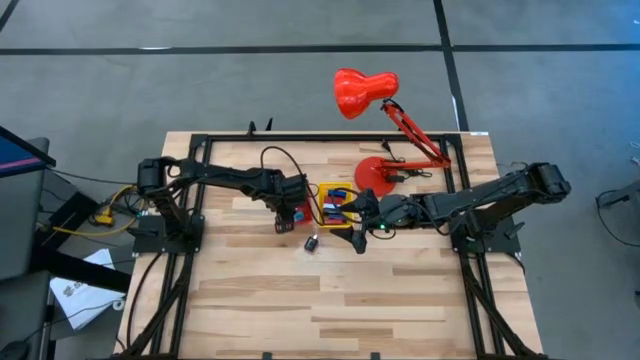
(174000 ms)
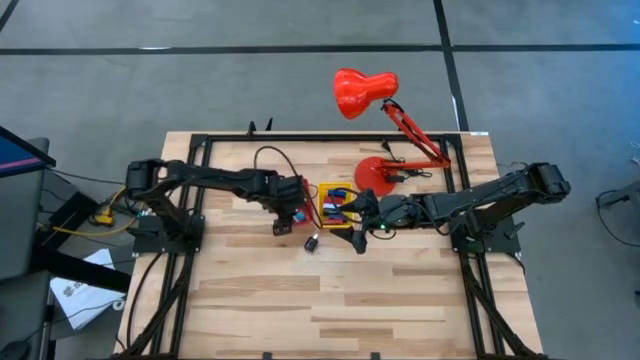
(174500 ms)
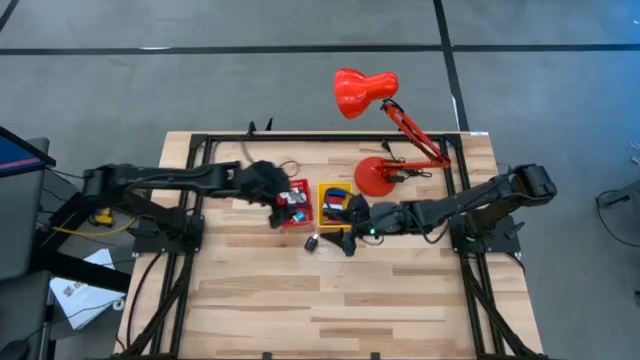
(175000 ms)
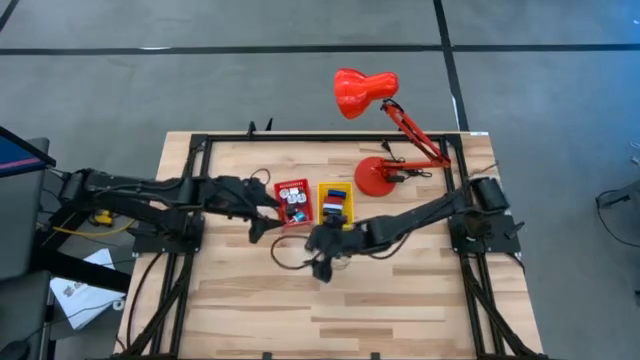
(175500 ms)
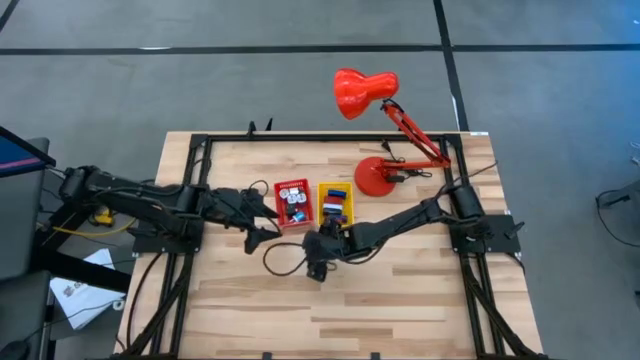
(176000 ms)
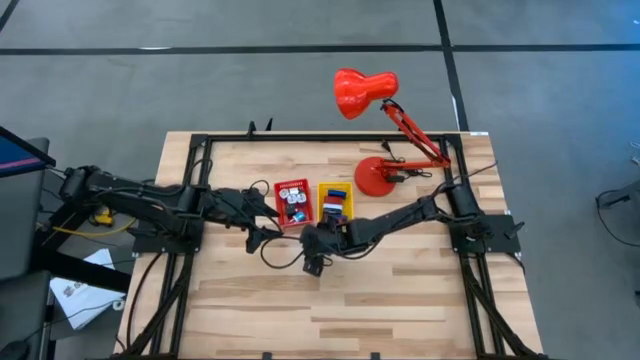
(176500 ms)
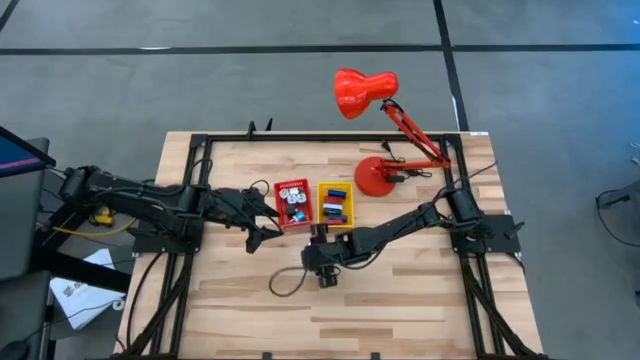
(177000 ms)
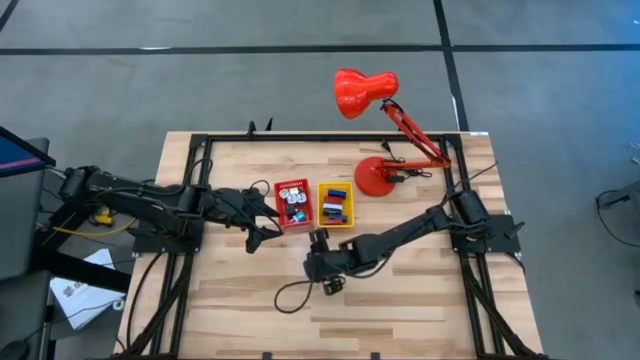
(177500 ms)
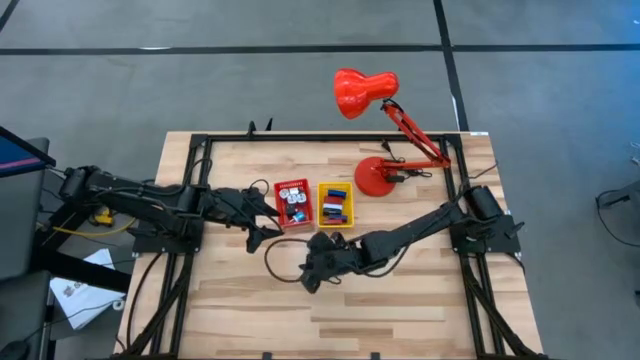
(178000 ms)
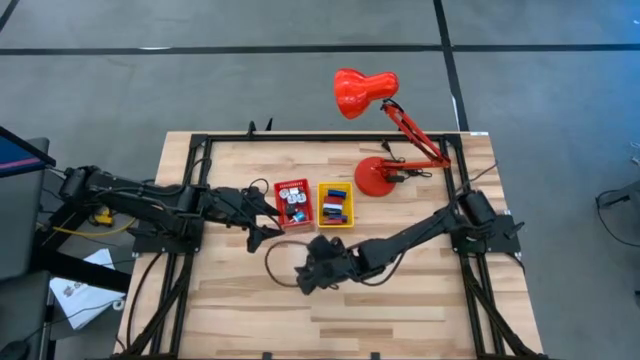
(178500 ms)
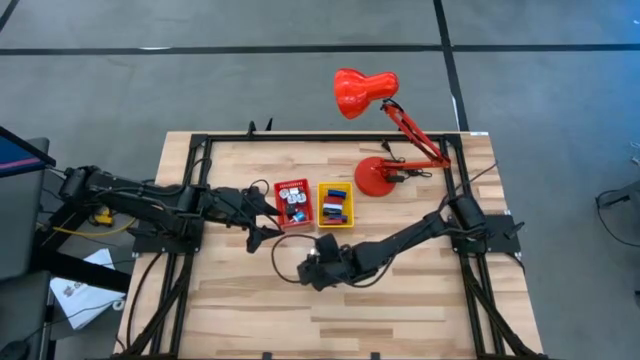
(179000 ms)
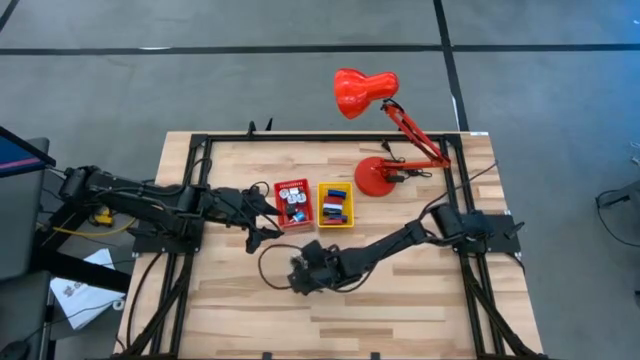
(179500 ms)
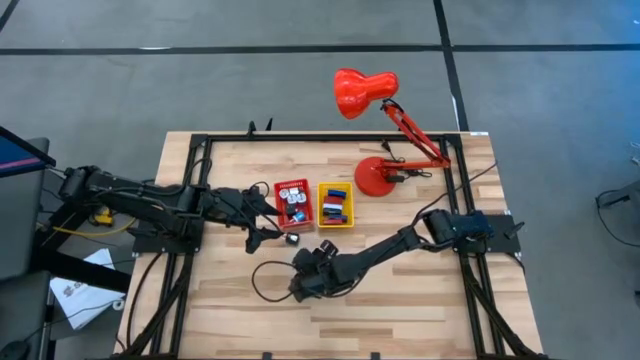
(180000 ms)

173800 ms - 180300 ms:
Task: Pick & Place Office items
Put the black charger adapter into the red basket

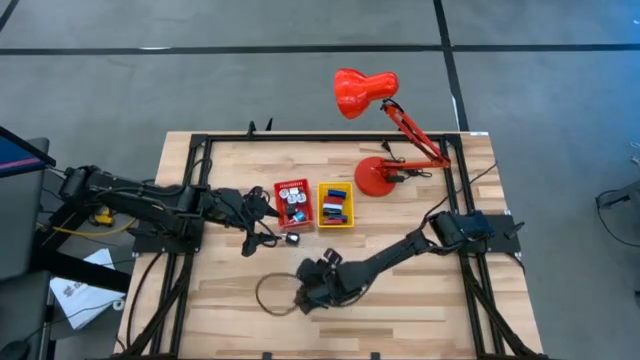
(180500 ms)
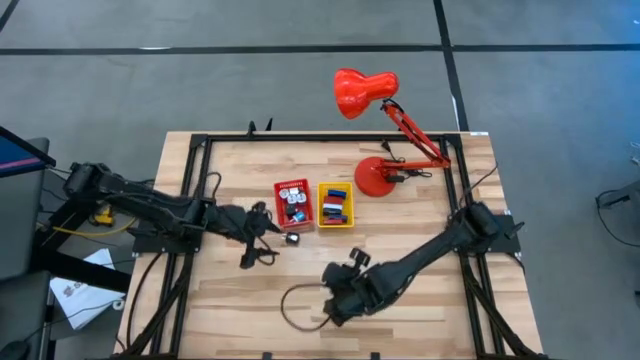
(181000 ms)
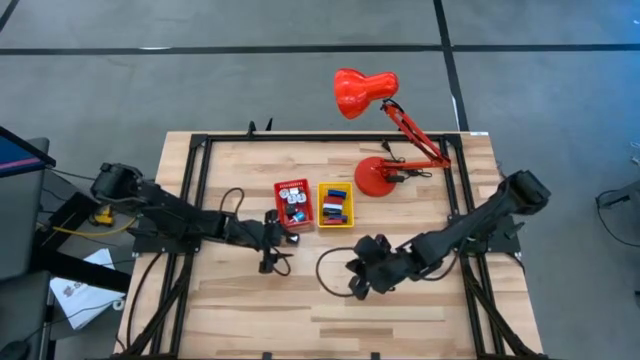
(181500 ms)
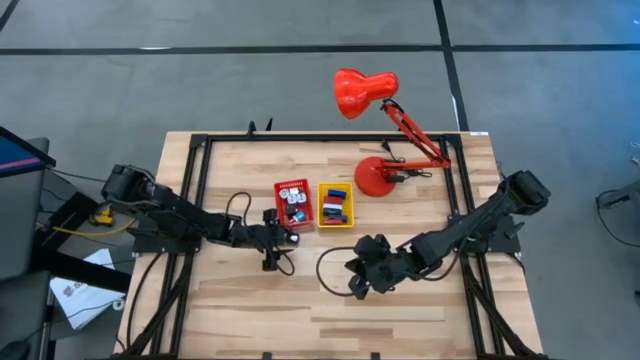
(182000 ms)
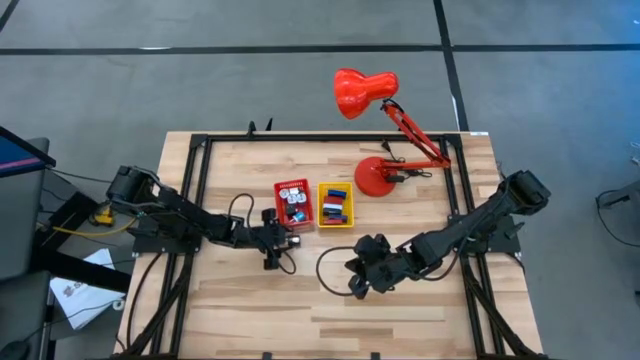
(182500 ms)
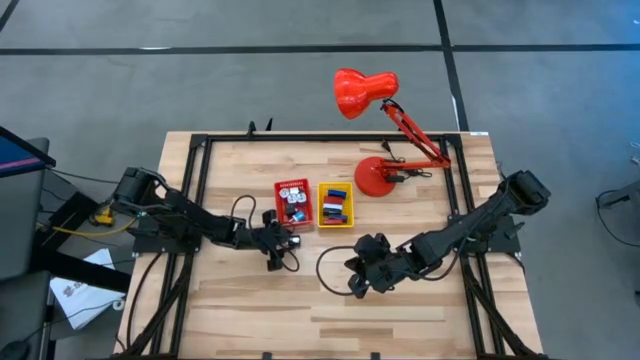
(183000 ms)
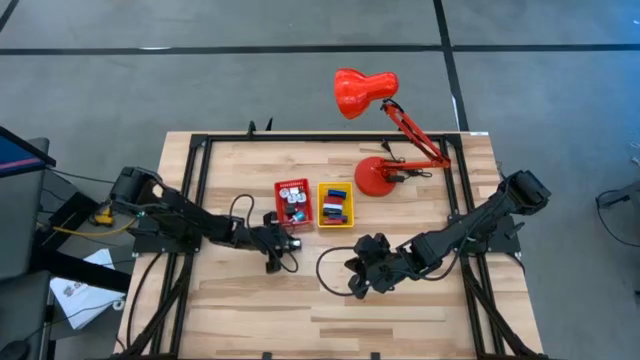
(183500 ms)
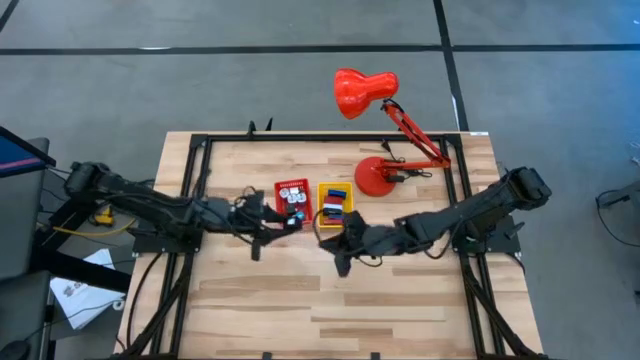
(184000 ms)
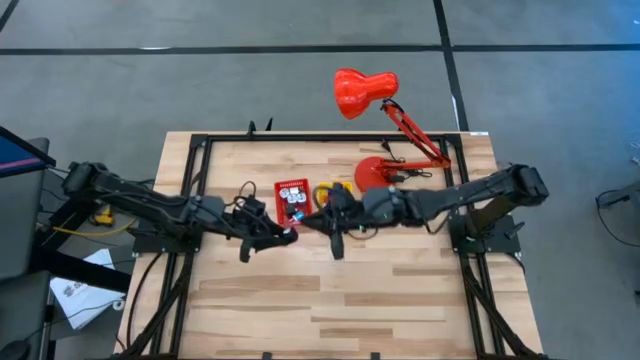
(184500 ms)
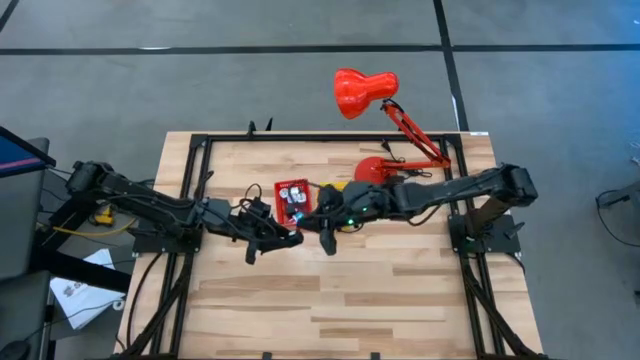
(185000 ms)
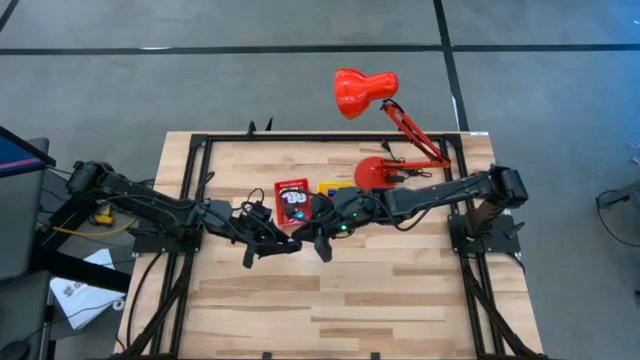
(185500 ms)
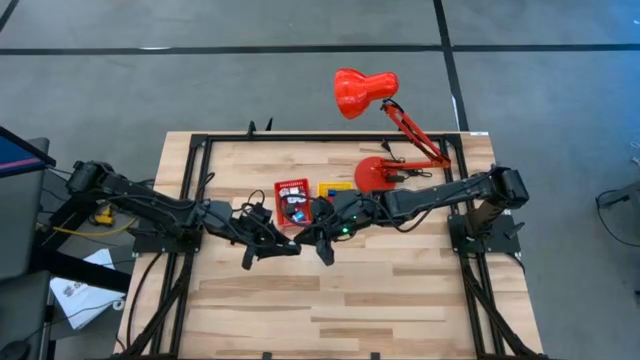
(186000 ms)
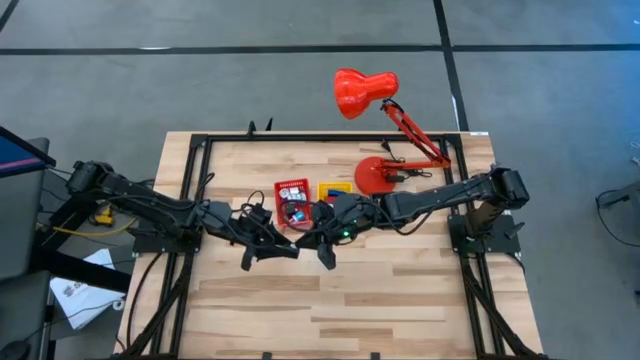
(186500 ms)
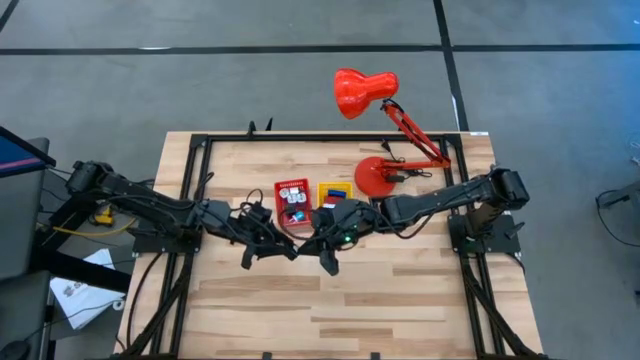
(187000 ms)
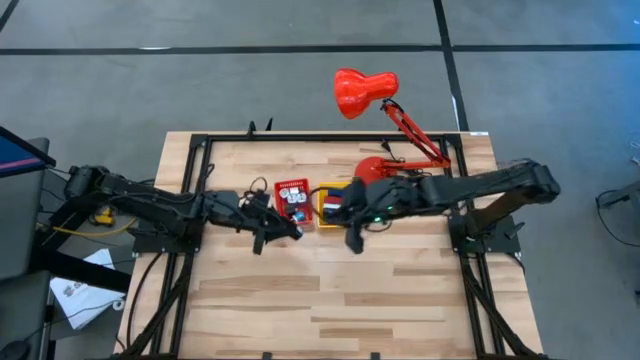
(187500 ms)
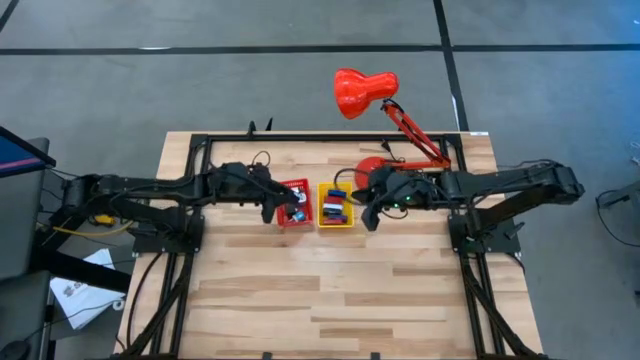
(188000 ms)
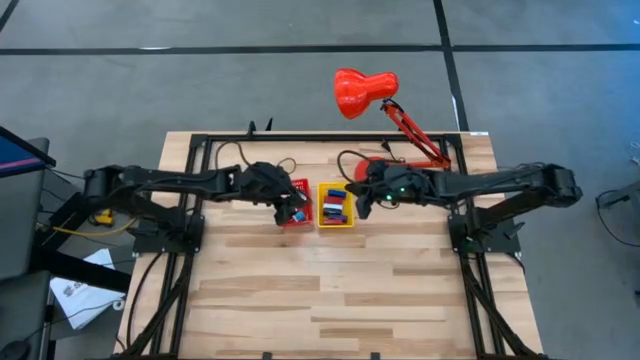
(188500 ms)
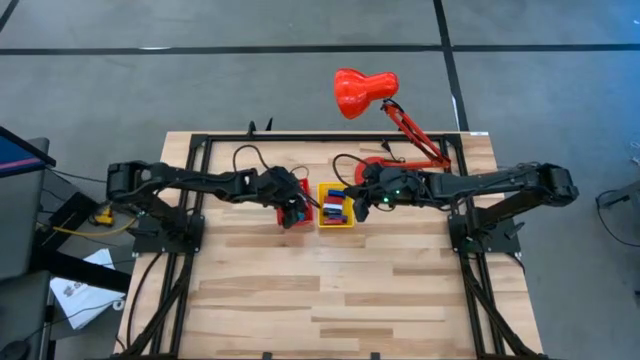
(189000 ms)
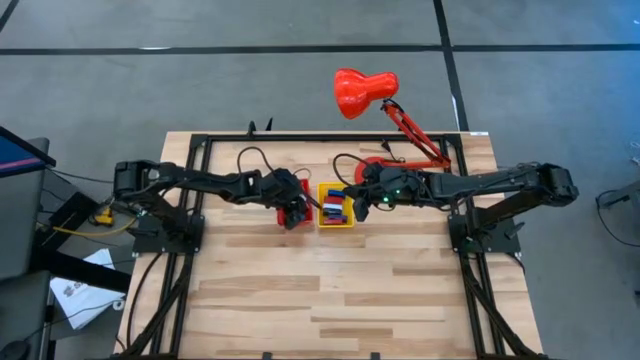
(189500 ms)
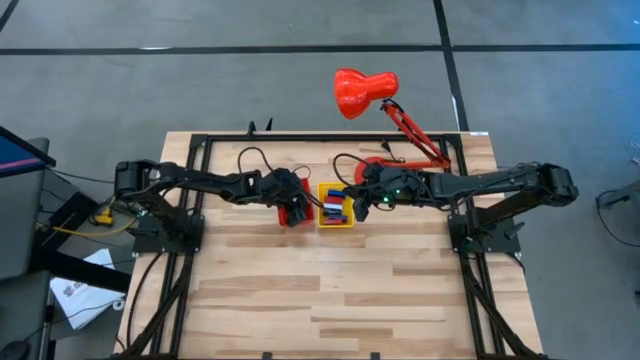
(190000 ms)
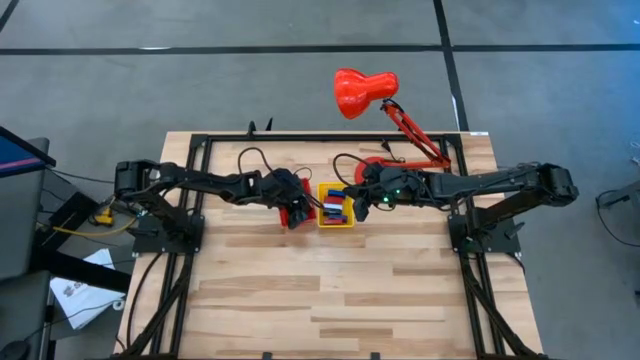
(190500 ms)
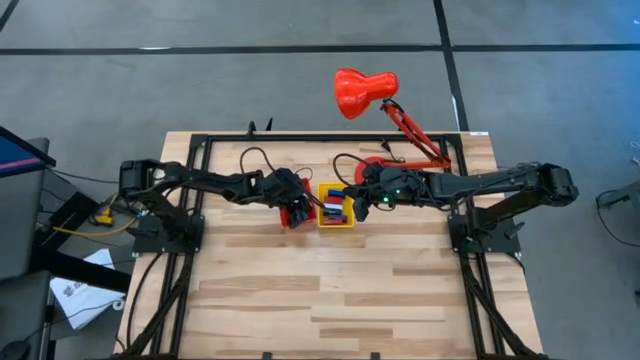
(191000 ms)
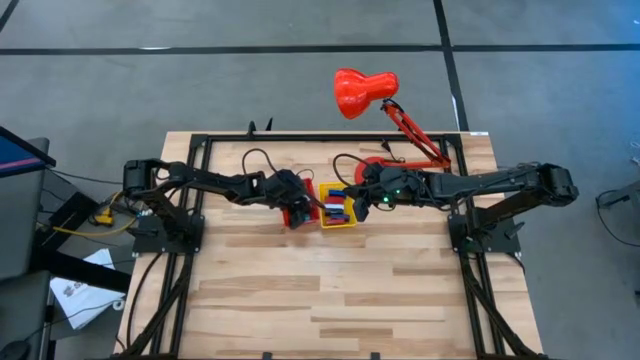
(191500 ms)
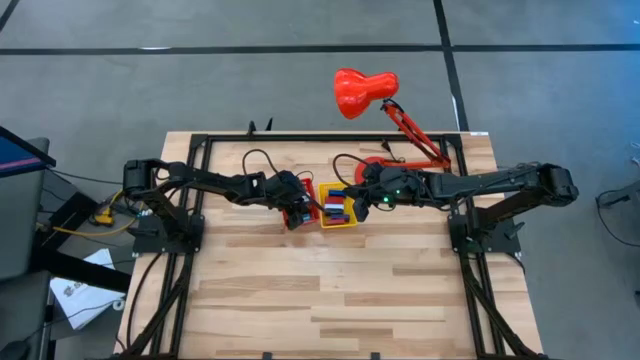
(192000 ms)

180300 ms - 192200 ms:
Put the black charger adapter into the red basket

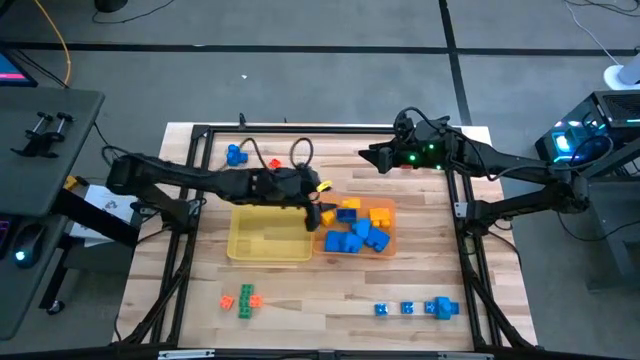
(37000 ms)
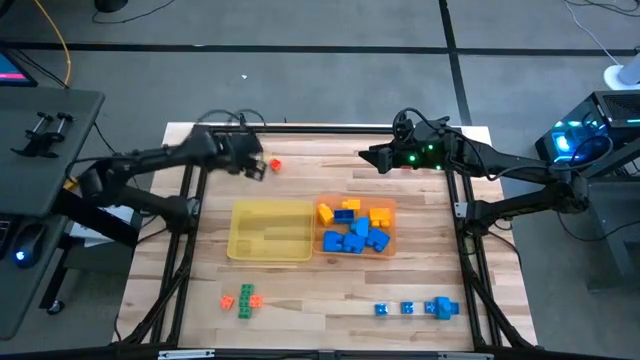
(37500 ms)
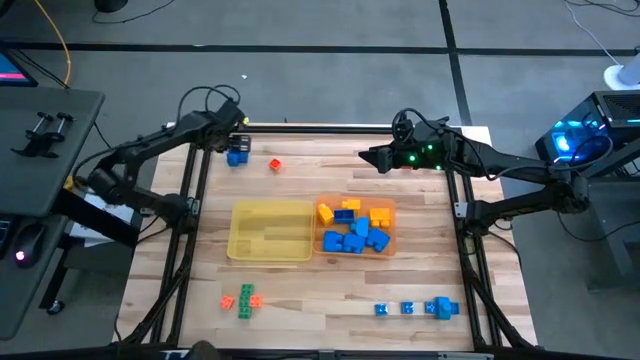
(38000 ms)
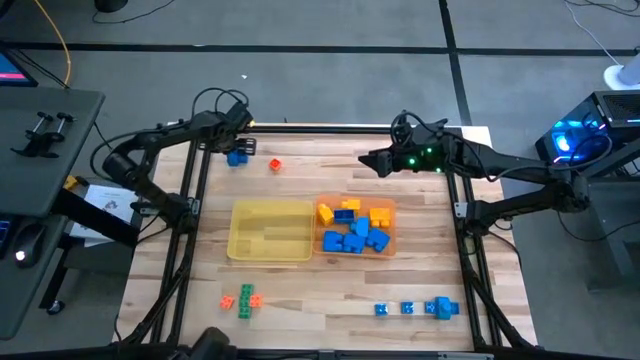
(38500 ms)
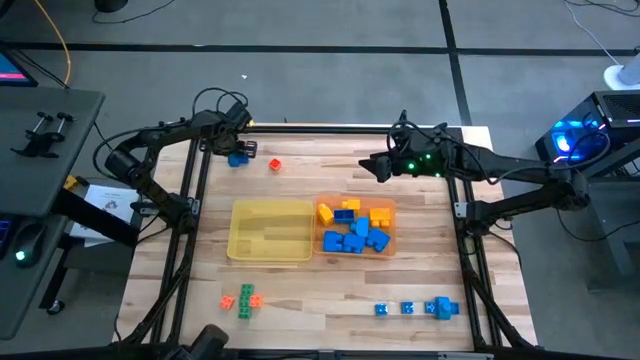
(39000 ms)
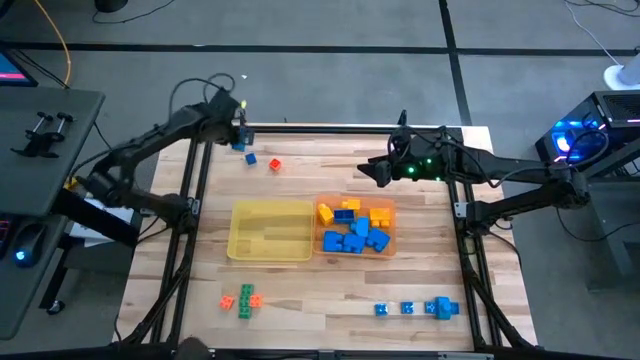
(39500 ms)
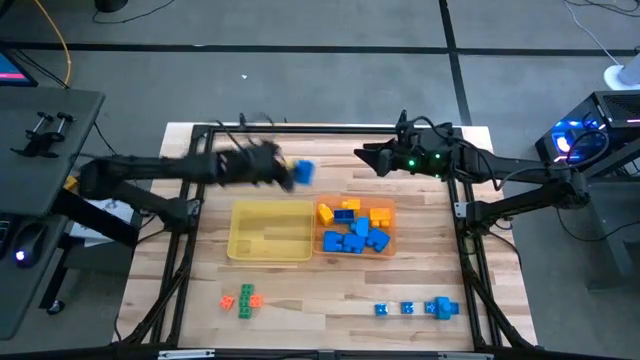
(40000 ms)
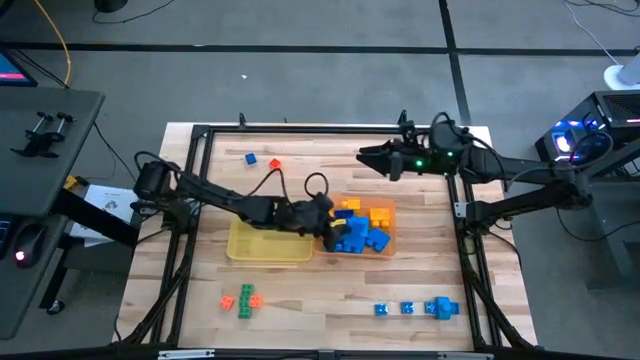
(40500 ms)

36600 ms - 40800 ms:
Task: Sort blocks by size
Put the large blue game piece into the orange bin
